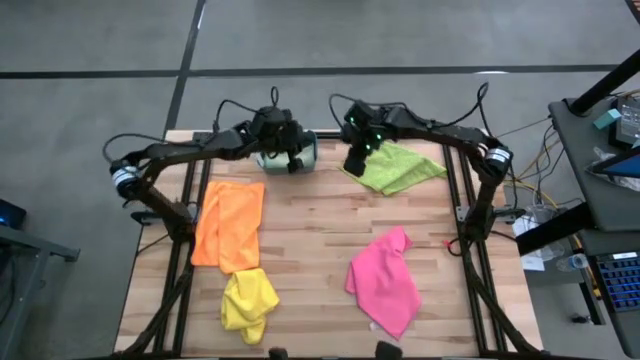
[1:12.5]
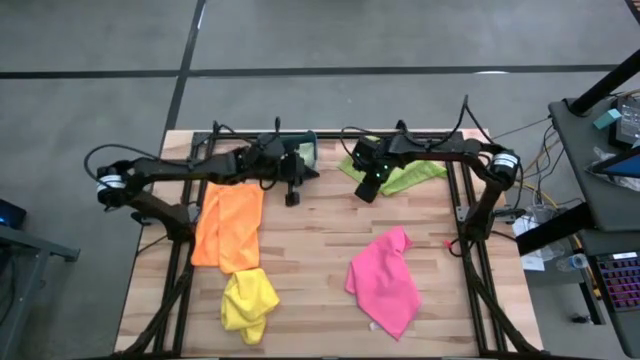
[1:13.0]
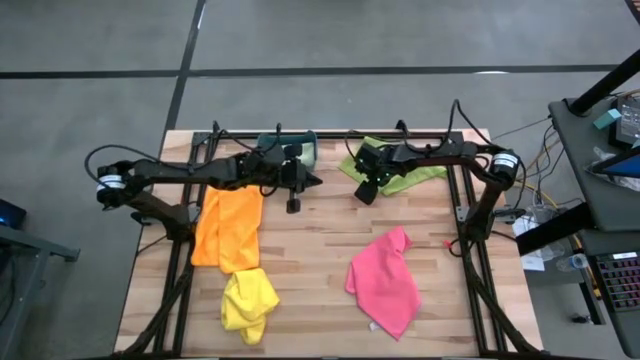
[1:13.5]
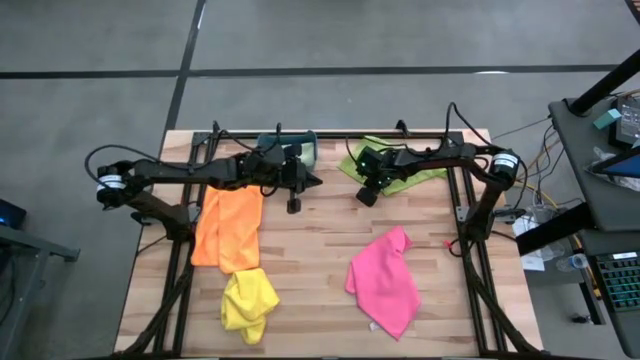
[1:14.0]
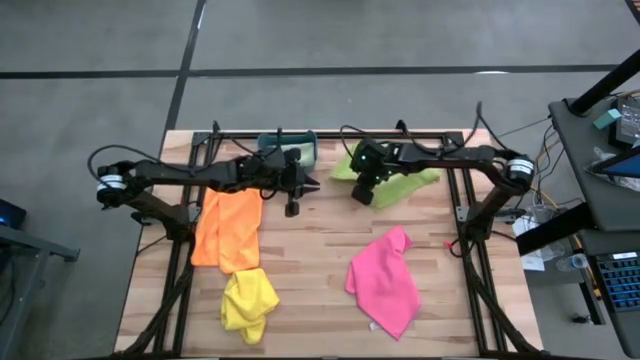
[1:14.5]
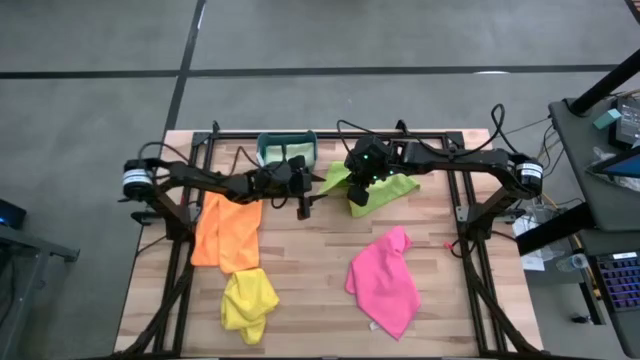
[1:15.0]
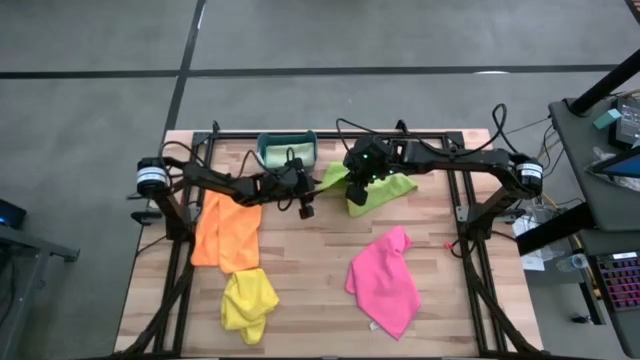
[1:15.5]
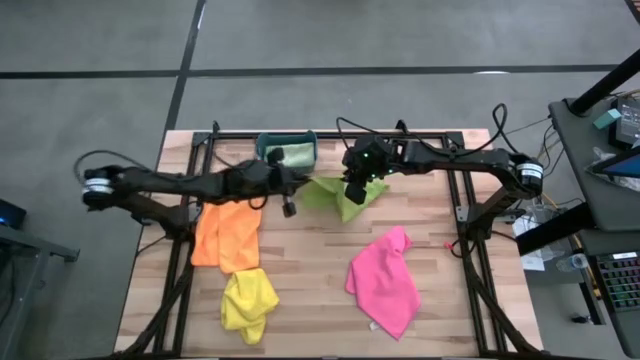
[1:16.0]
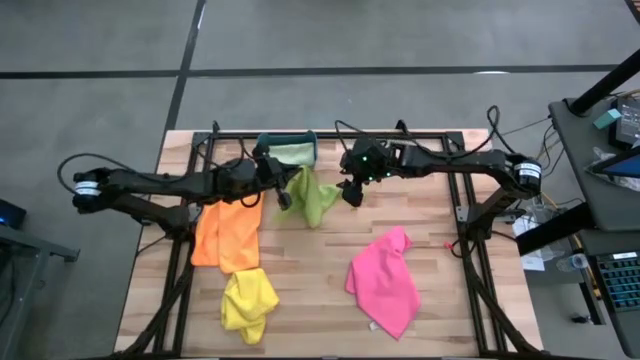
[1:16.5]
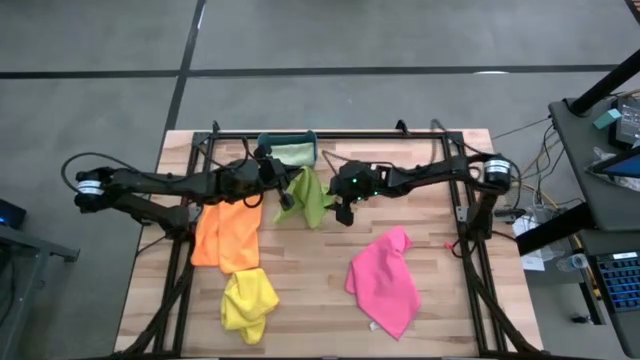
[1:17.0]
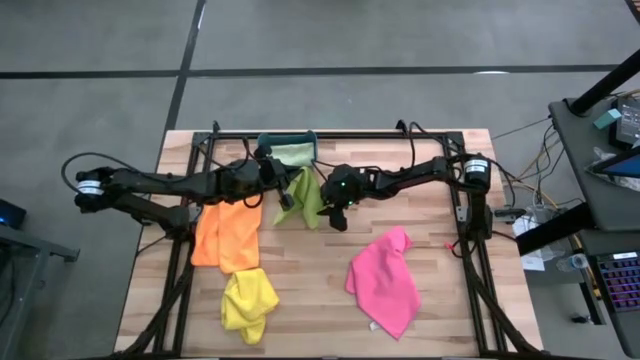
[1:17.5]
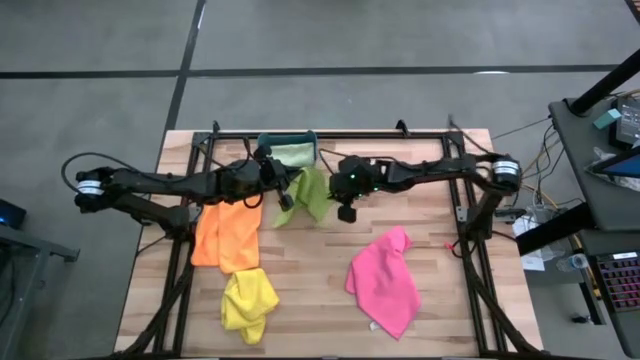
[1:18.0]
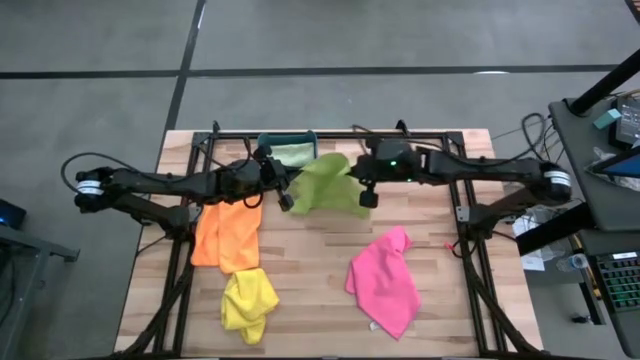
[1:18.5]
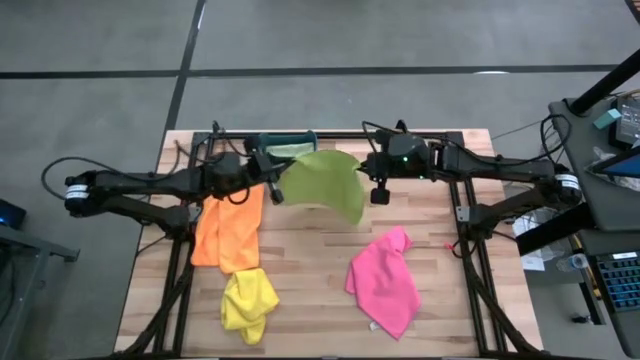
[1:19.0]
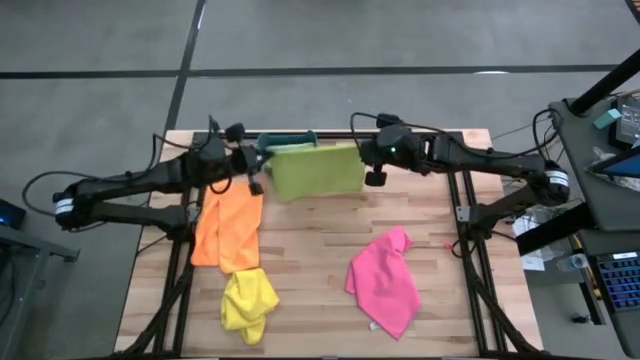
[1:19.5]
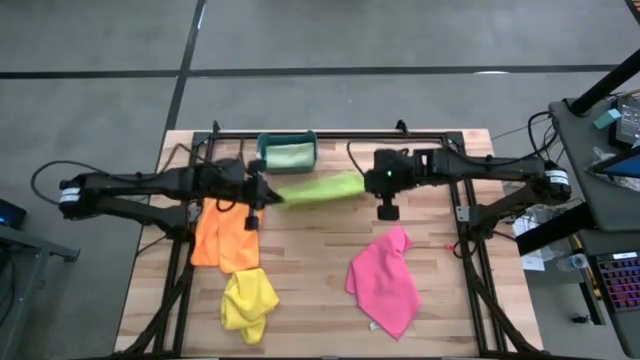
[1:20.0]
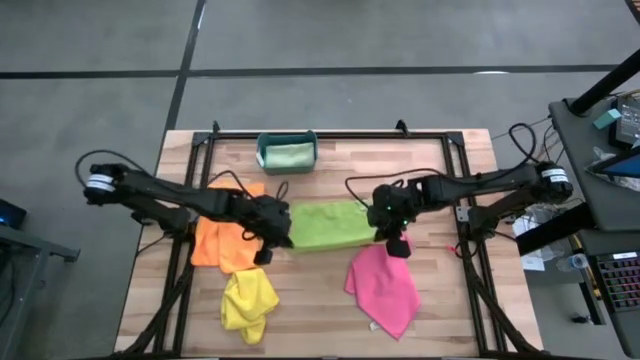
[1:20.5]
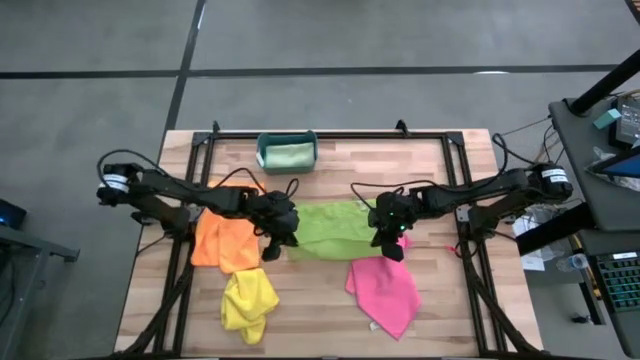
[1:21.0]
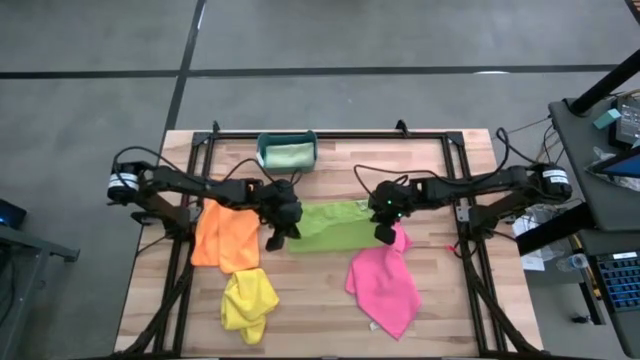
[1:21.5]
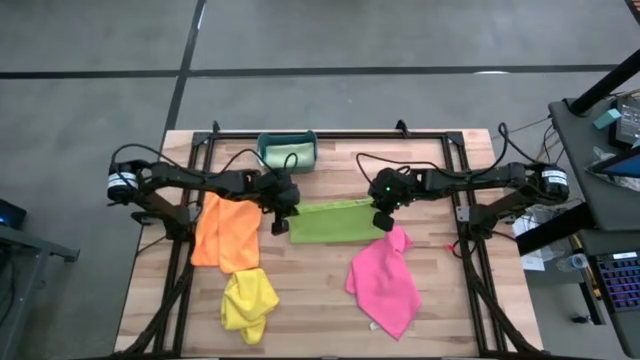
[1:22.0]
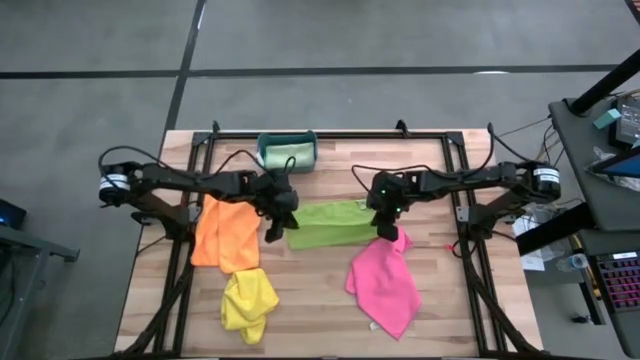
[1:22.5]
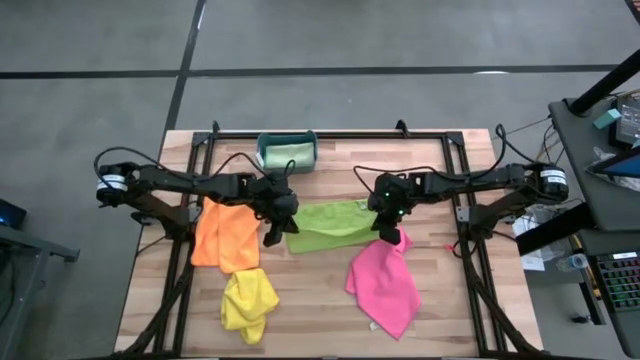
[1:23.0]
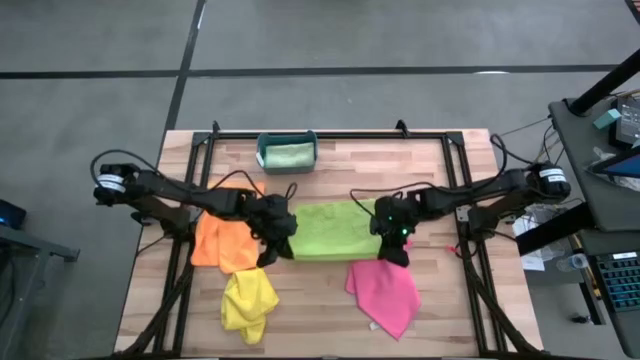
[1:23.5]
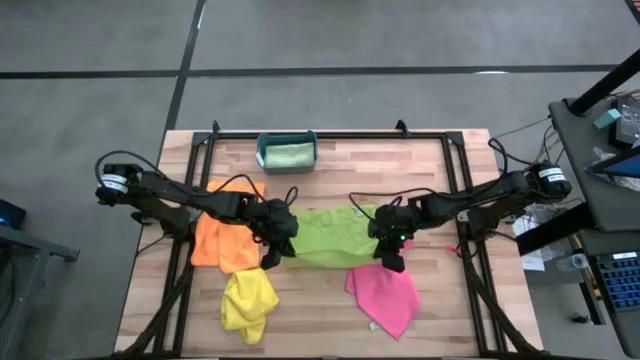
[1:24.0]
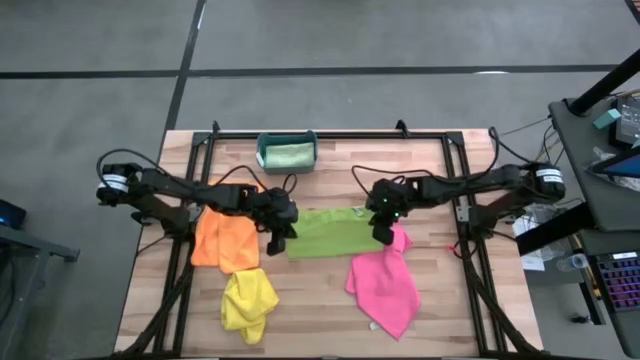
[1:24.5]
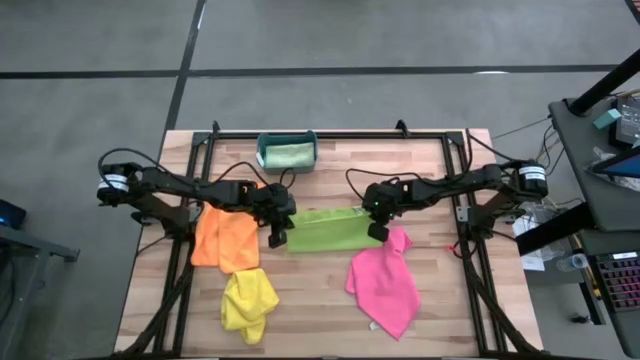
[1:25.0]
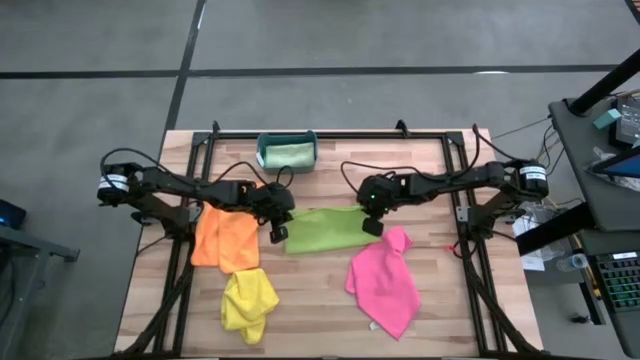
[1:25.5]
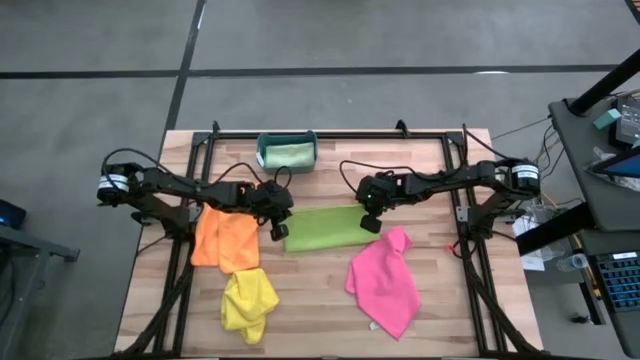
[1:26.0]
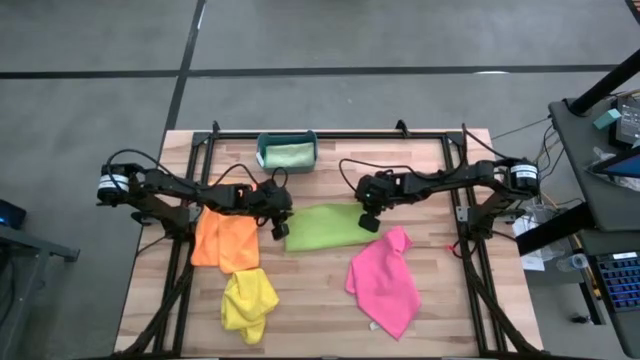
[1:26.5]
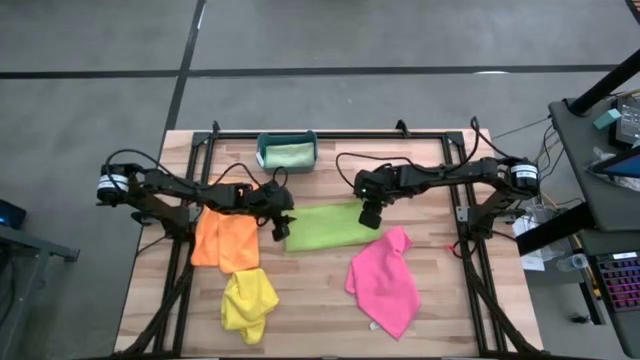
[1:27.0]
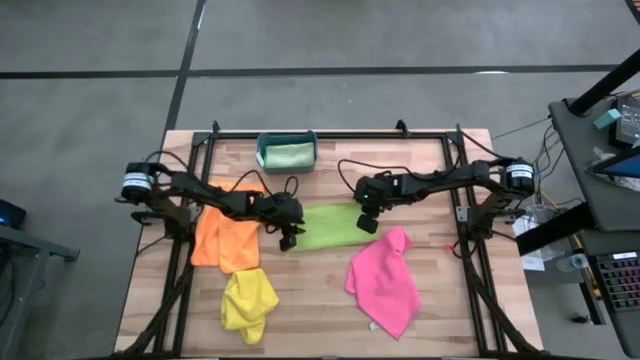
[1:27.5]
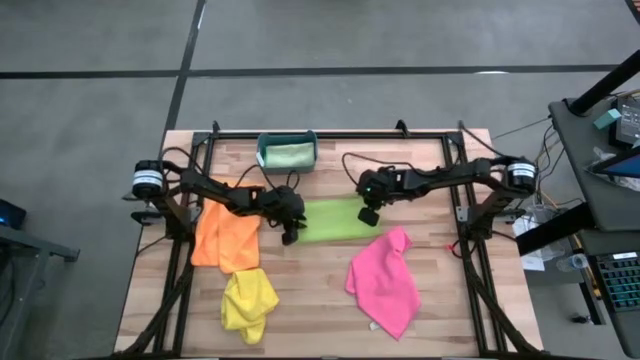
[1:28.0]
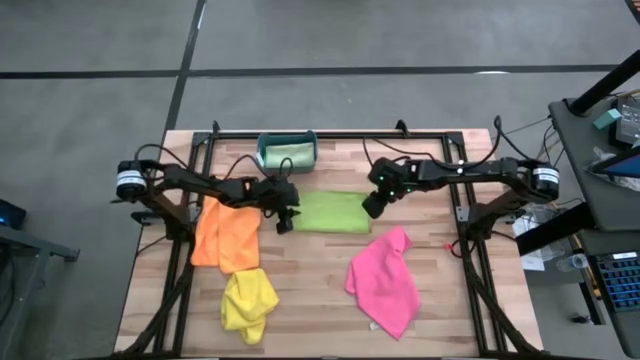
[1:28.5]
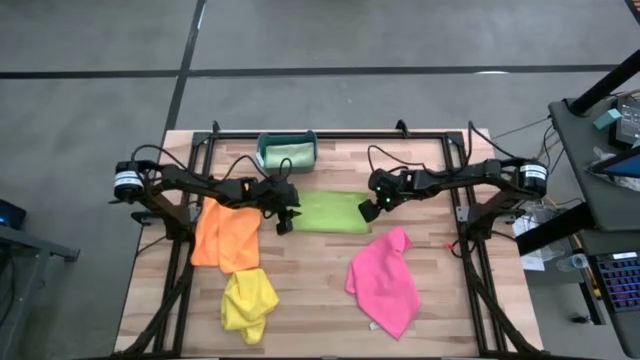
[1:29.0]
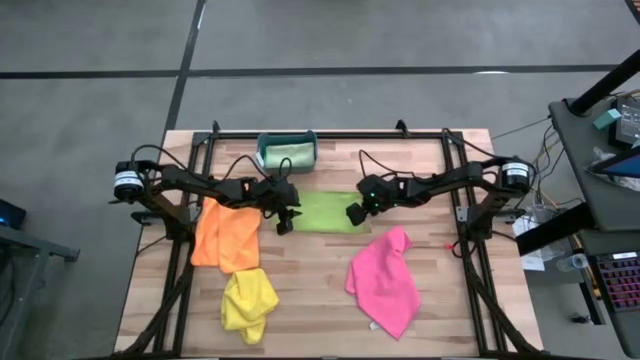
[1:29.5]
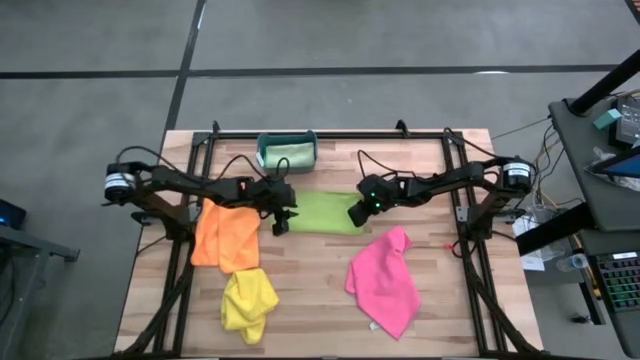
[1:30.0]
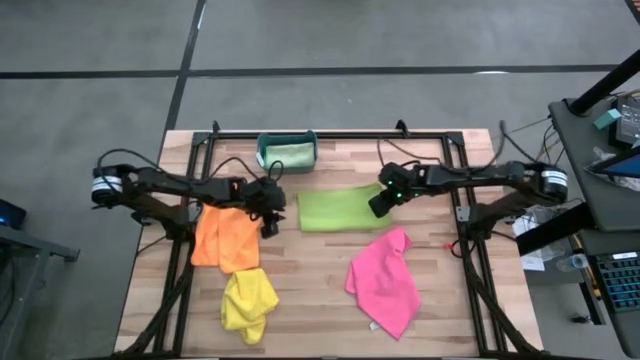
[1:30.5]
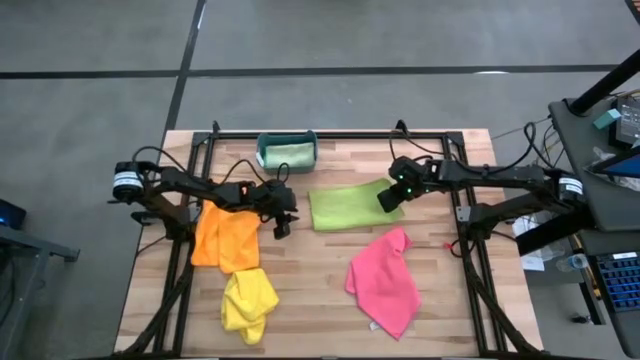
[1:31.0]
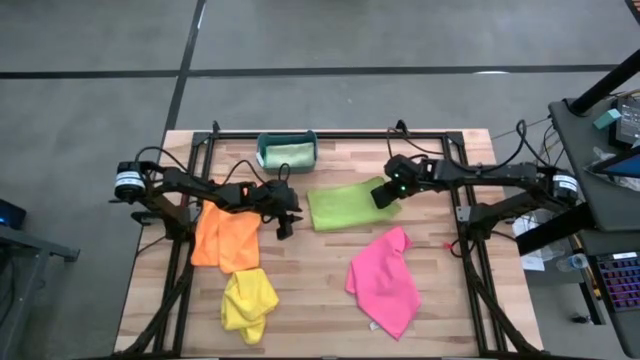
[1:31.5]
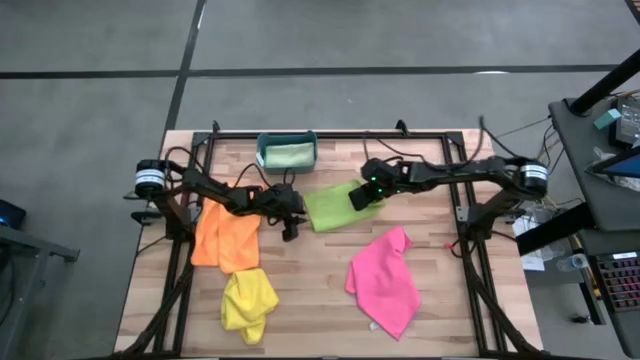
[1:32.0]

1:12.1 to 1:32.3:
Task: Fold microfiber towels
Fold the green towel
